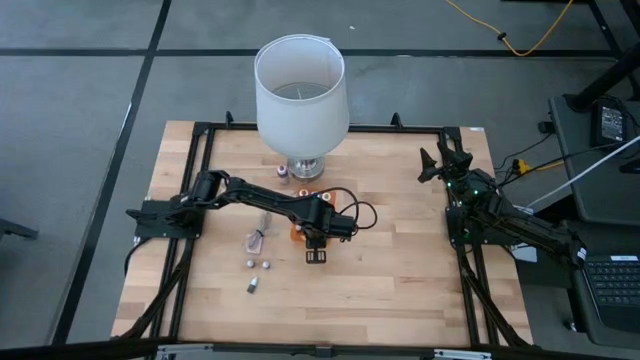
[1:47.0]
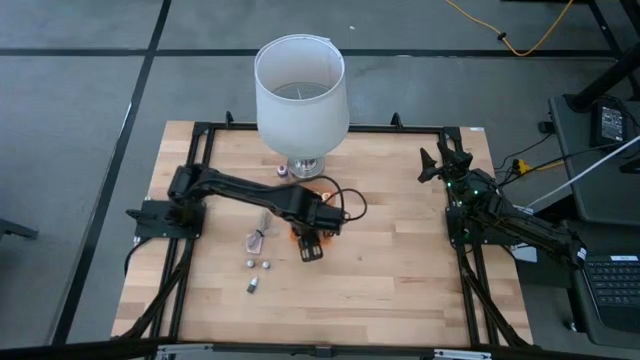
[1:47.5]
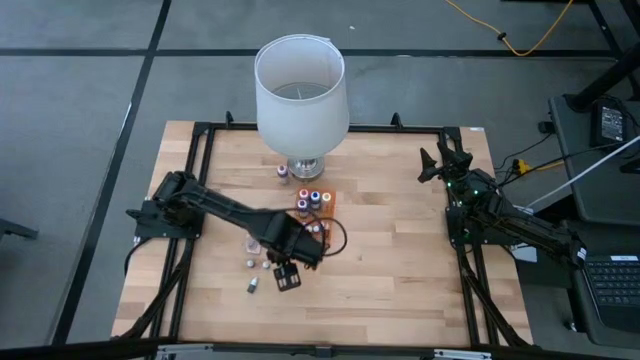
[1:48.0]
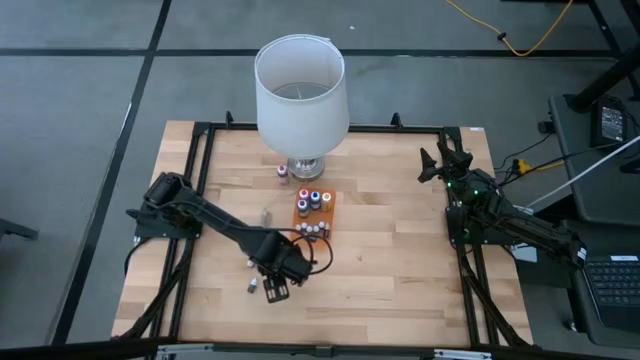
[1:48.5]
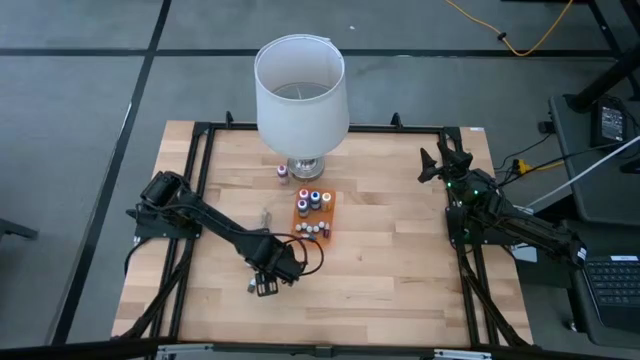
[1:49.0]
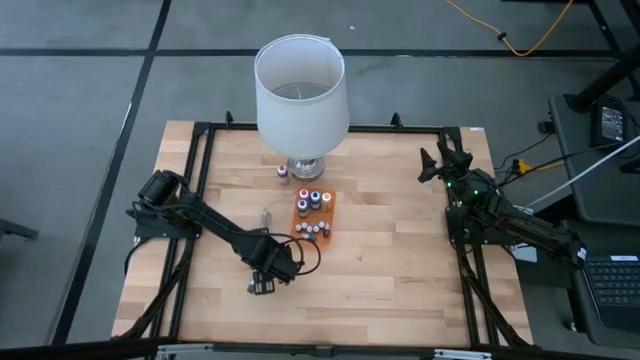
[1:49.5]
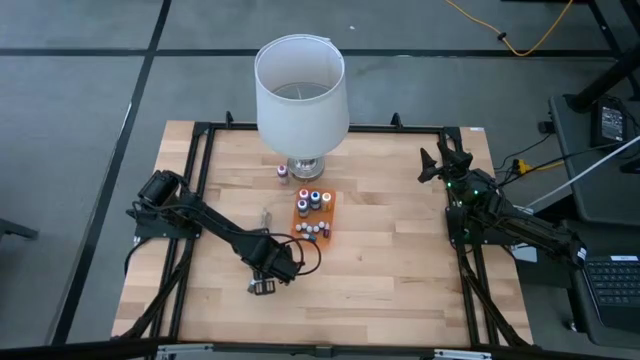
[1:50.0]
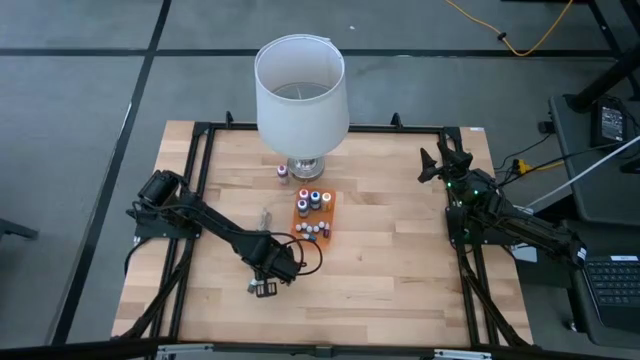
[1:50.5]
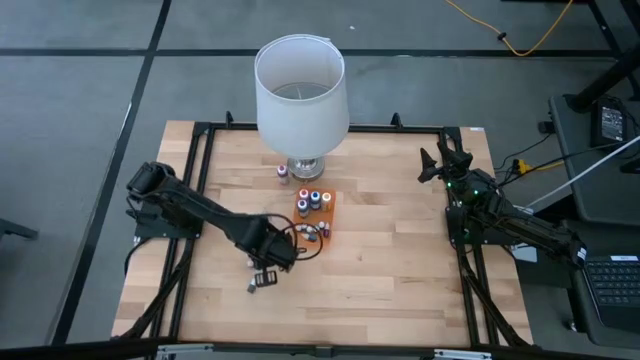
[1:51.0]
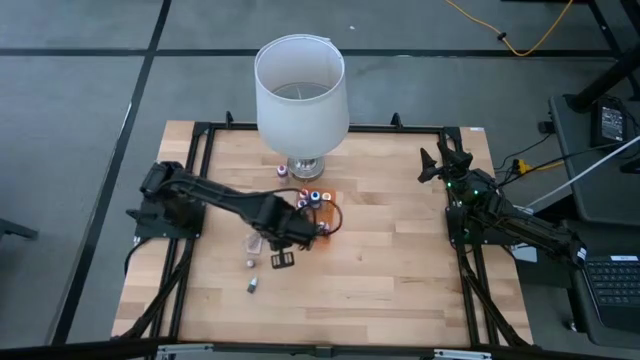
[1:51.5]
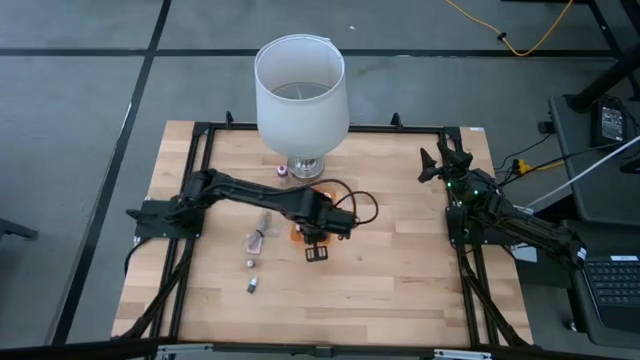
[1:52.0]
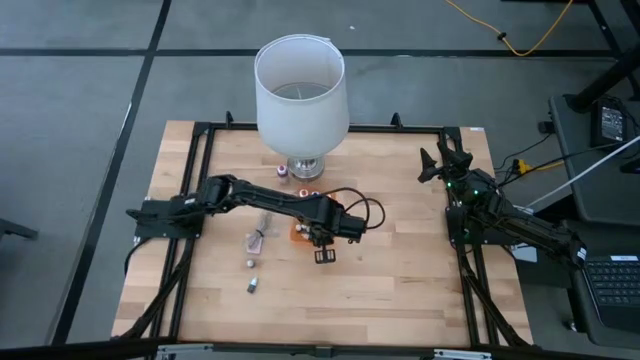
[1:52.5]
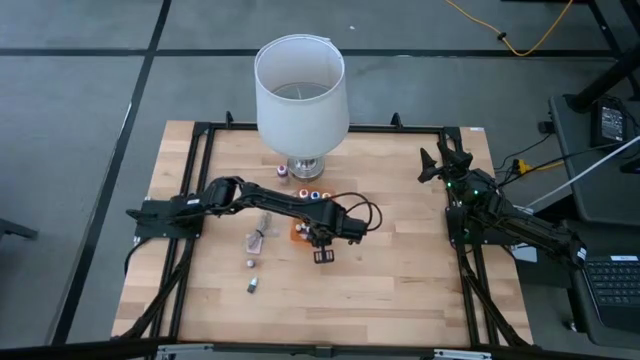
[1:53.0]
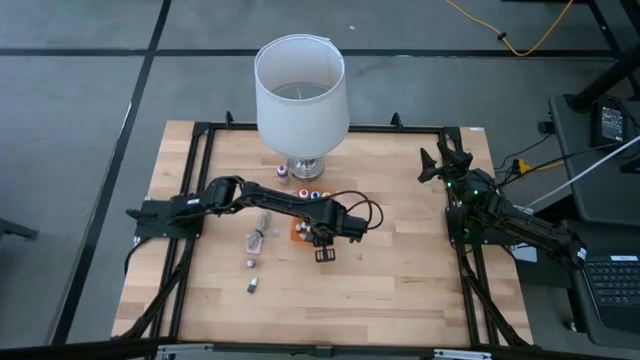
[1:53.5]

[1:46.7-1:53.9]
Task: Pick & Place food coloring
Put the small black food coloring bottle into the orange bin

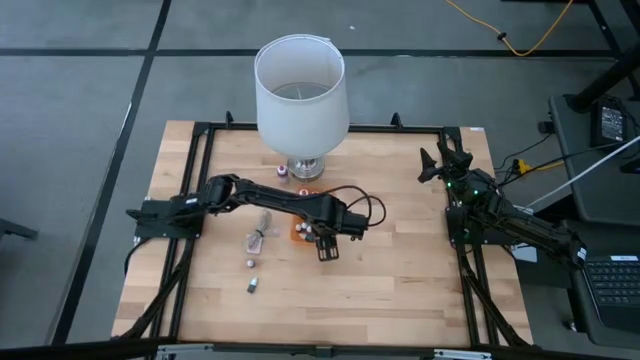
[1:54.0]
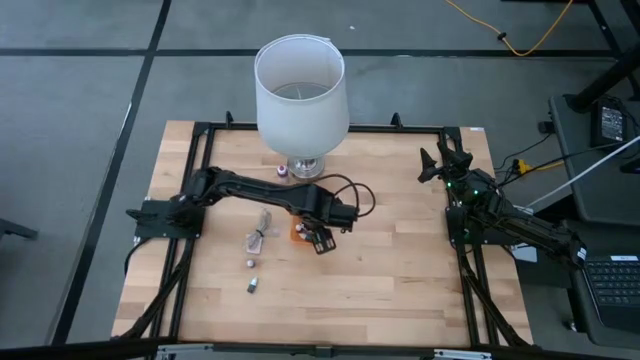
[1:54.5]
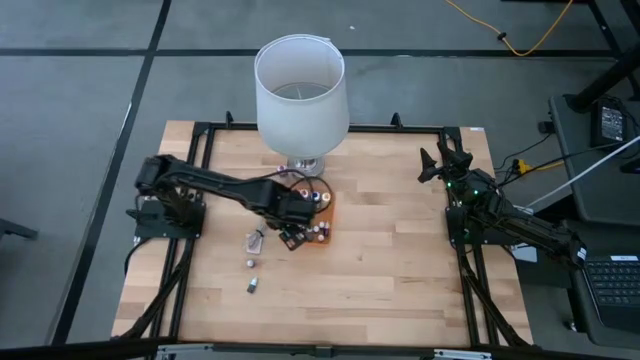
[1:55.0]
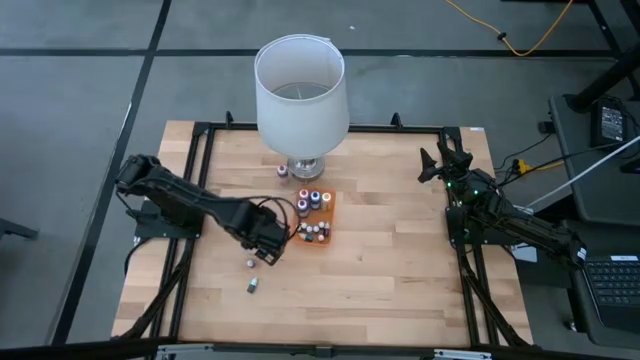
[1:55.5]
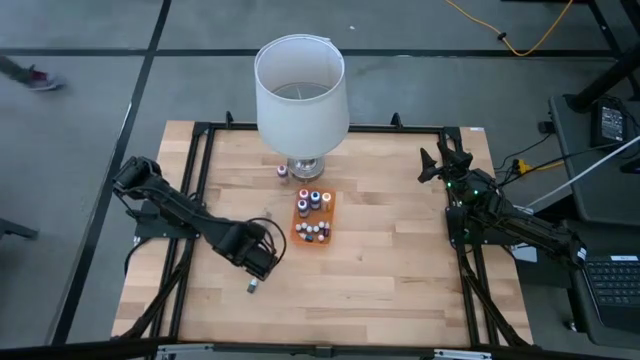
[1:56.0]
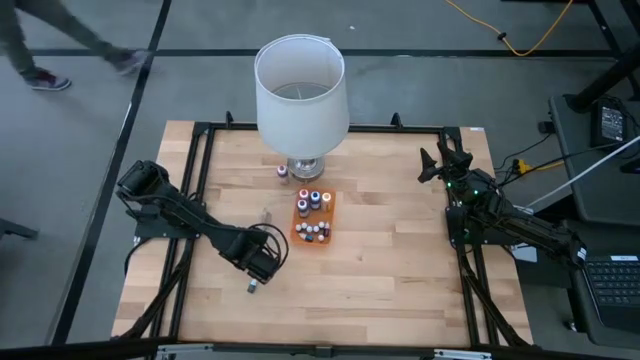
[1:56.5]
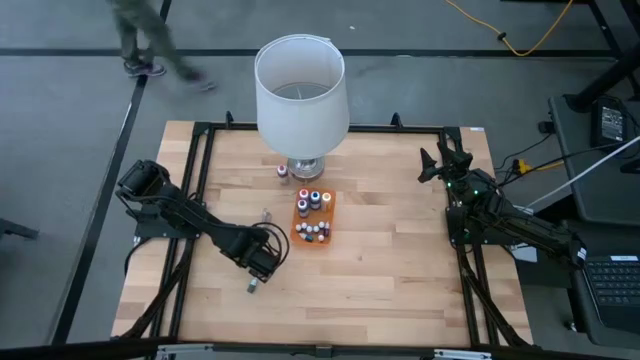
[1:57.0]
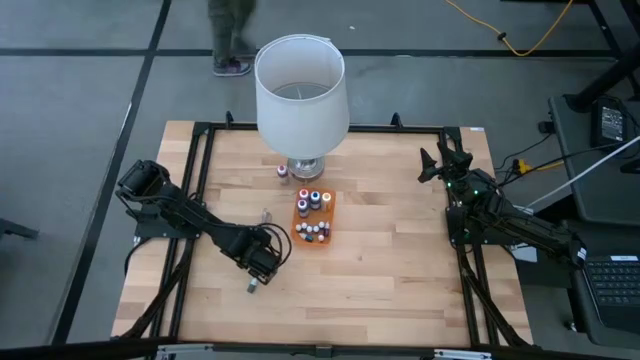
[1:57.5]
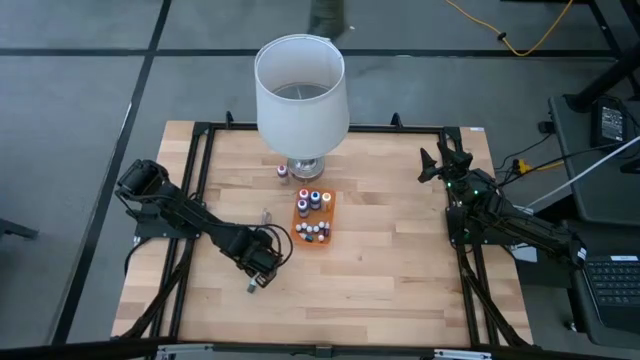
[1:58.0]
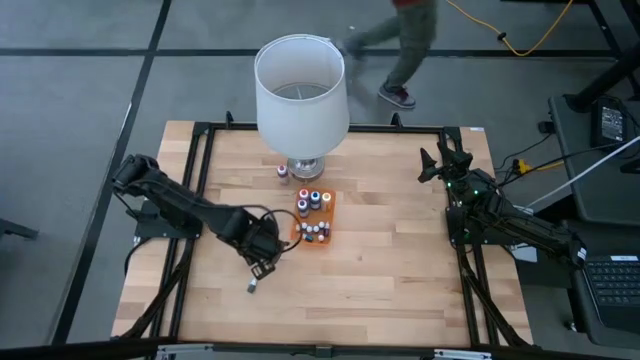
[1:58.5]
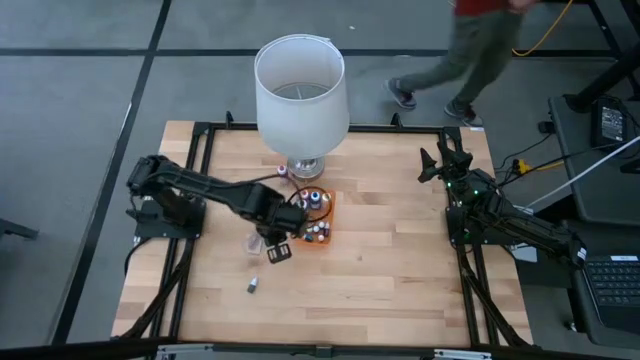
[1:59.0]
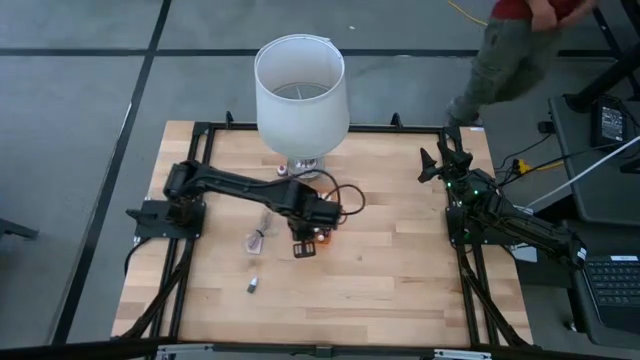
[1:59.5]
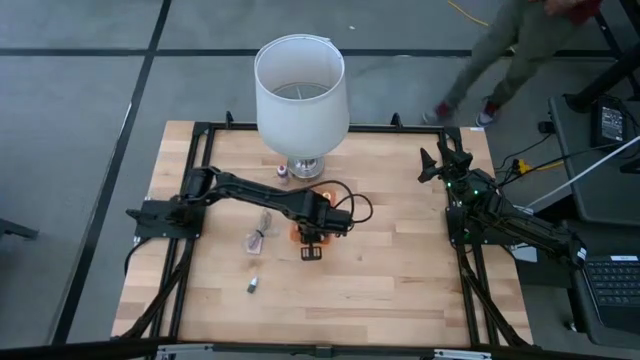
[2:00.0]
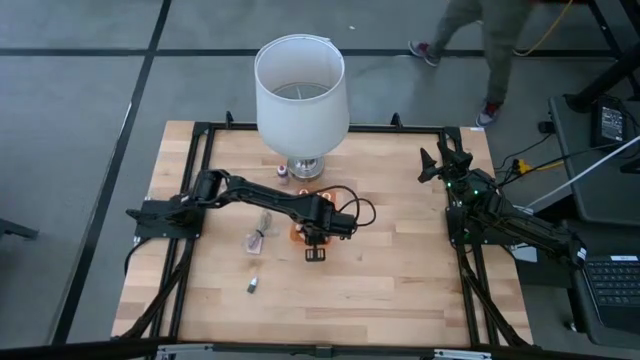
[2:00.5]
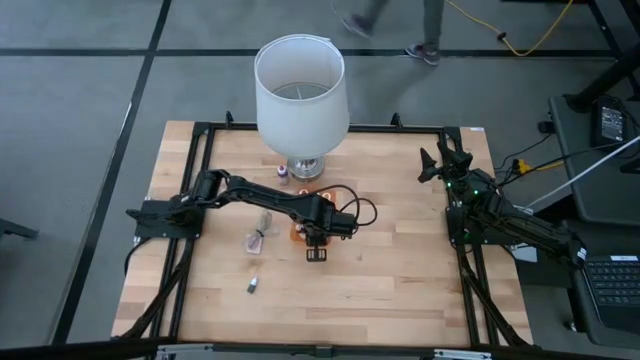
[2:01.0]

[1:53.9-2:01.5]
Put the small red food coloring bottle into the orange bin

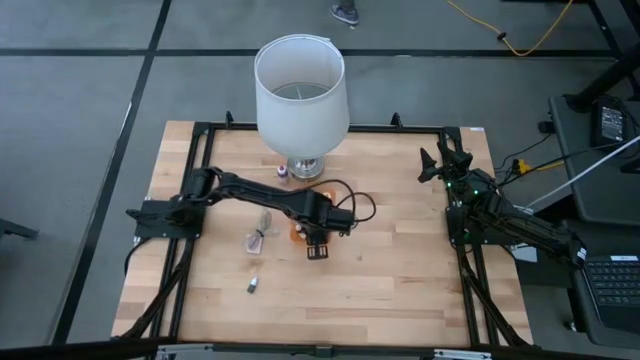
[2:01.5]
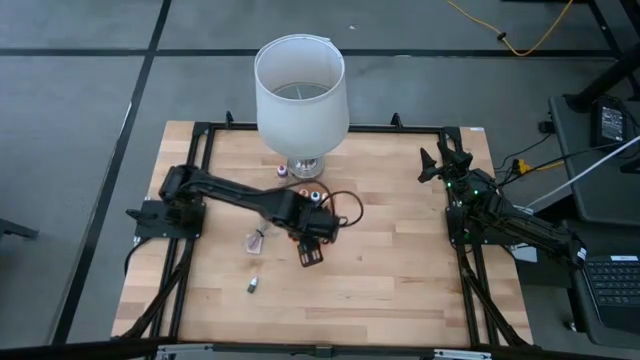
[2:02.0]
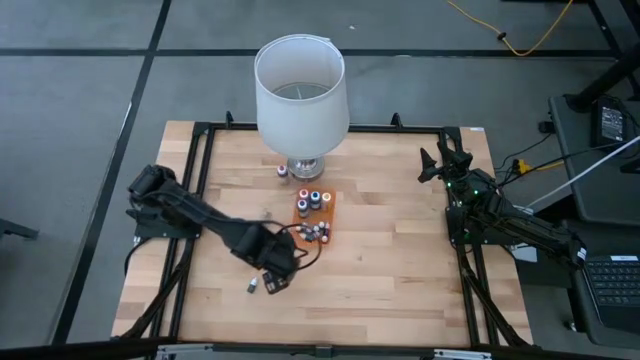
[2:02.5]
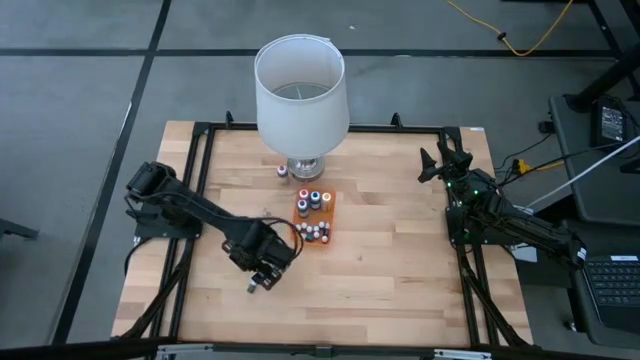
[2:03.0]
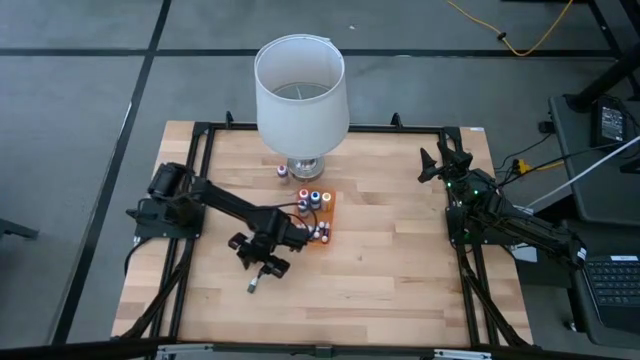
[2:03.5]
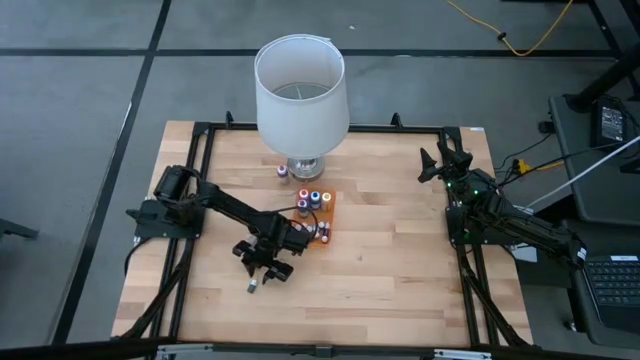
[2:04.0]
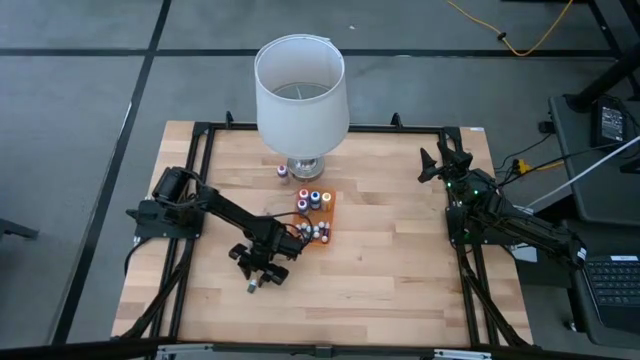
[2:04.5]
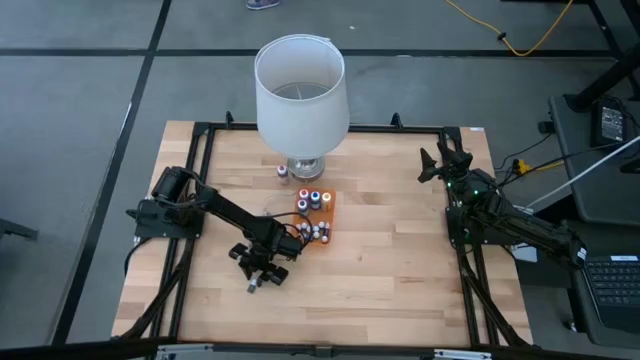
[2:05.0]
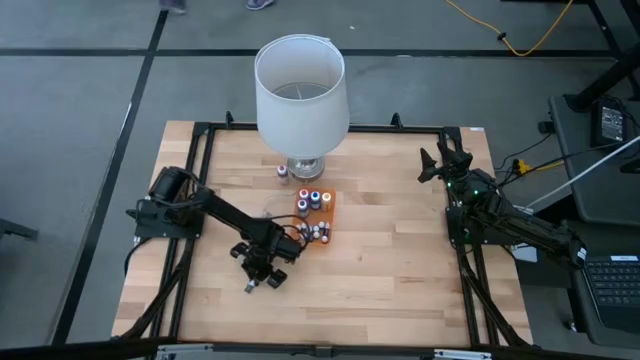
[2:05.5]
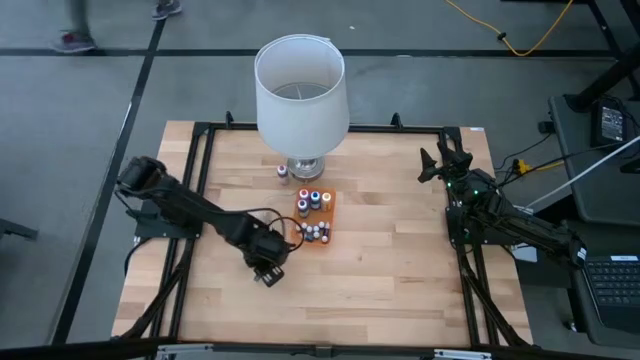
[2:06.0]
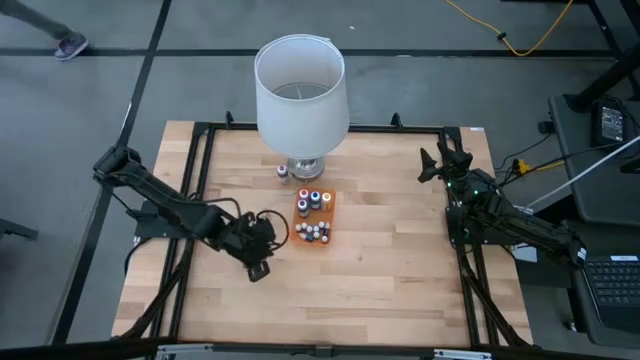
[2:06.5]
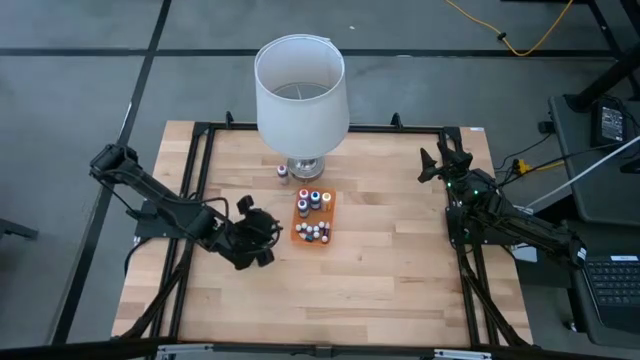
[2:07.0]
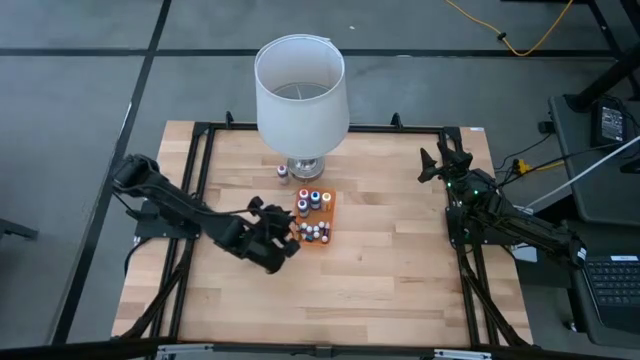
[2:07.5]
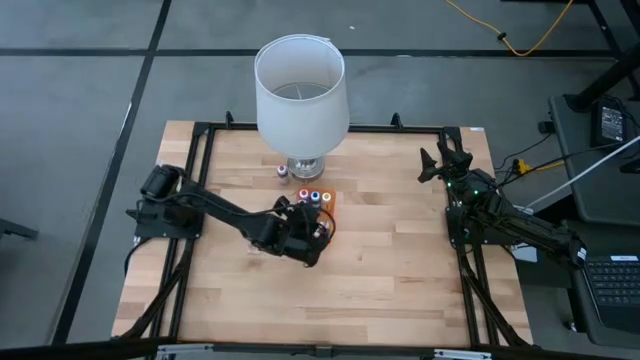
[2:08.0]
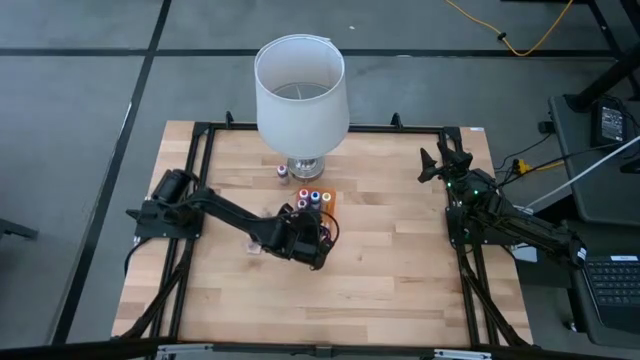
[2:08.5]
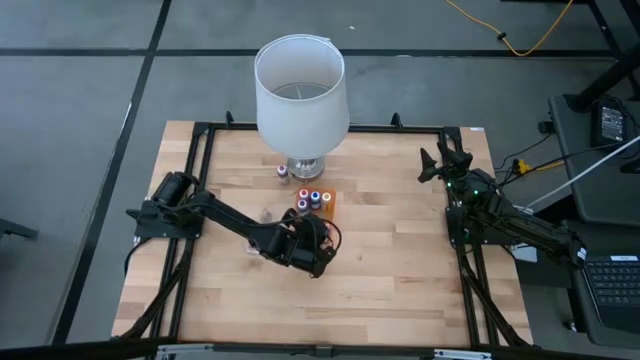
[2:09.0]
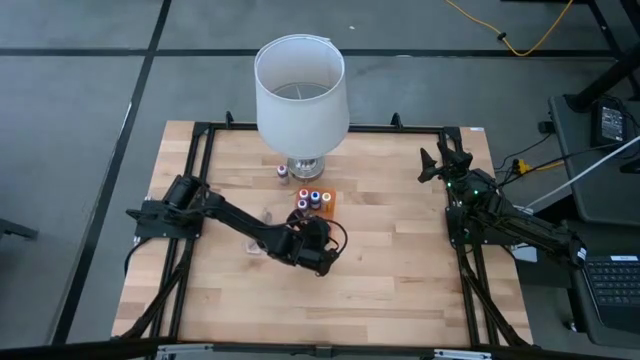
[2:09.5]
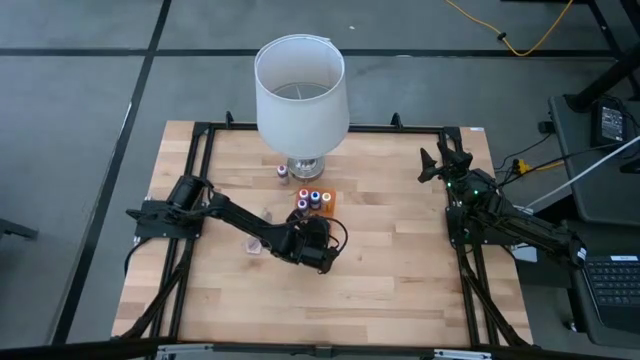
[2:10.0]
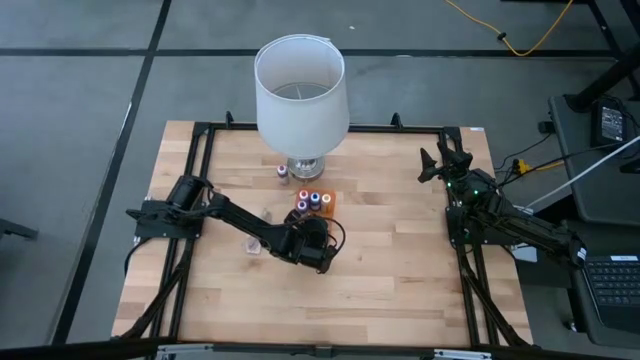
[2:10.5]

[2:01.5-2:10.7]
Put the small green food coloring bottle into the orange bin
